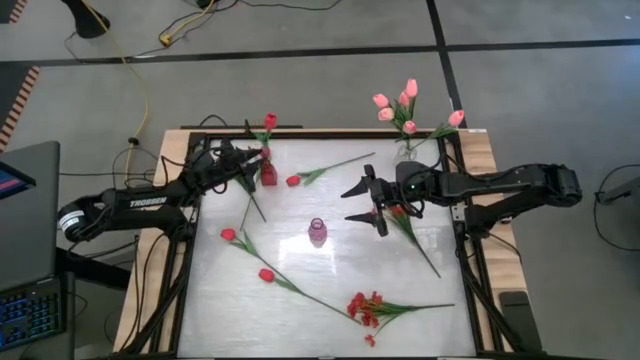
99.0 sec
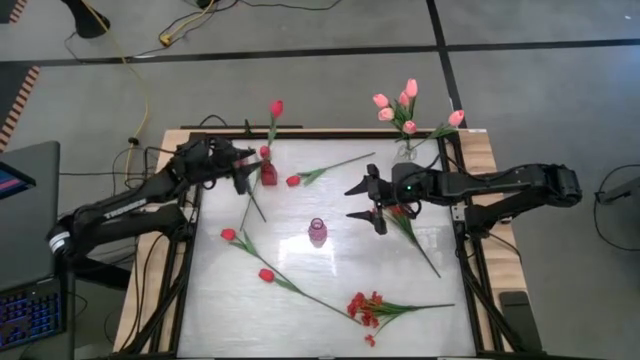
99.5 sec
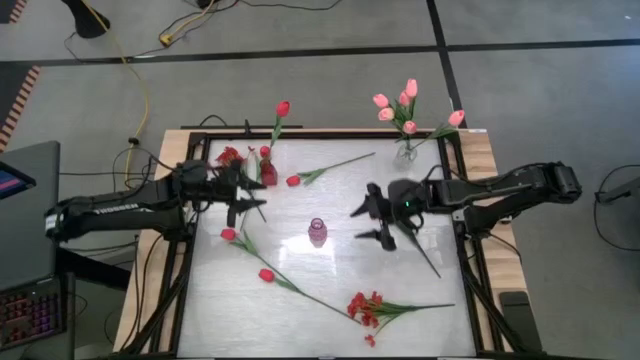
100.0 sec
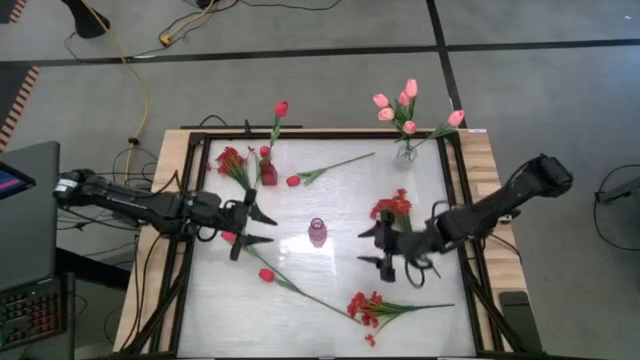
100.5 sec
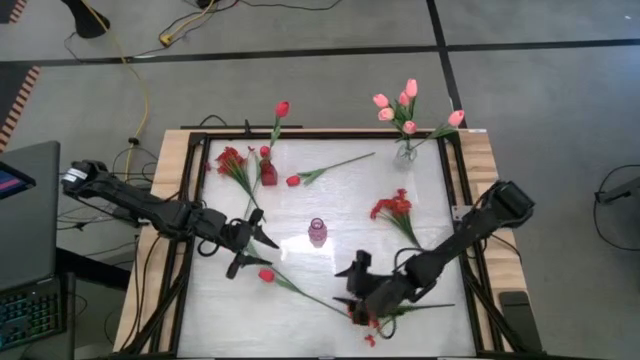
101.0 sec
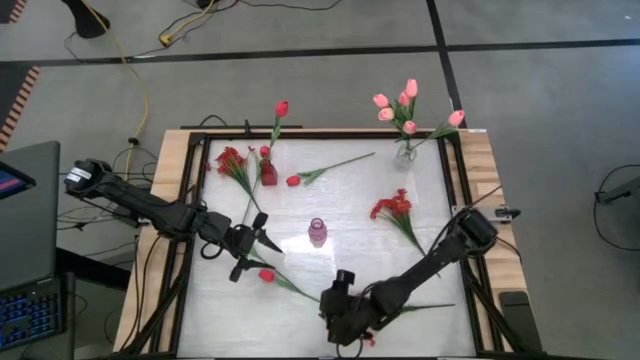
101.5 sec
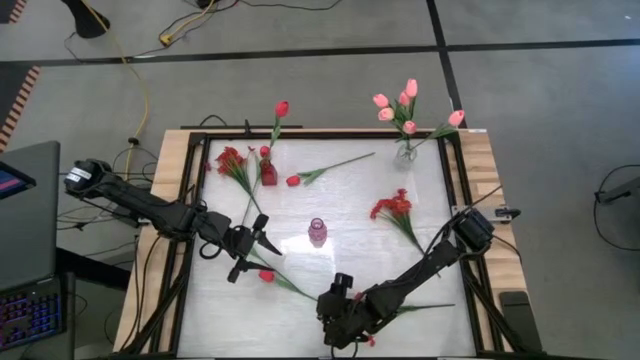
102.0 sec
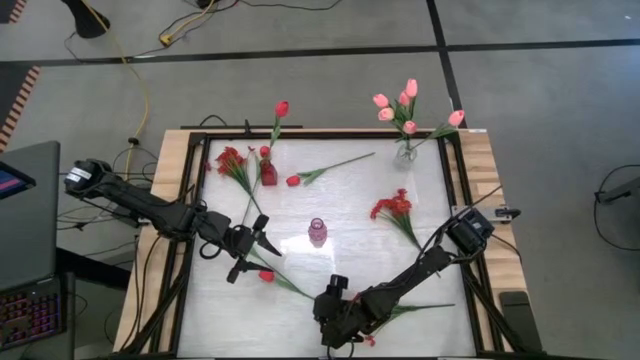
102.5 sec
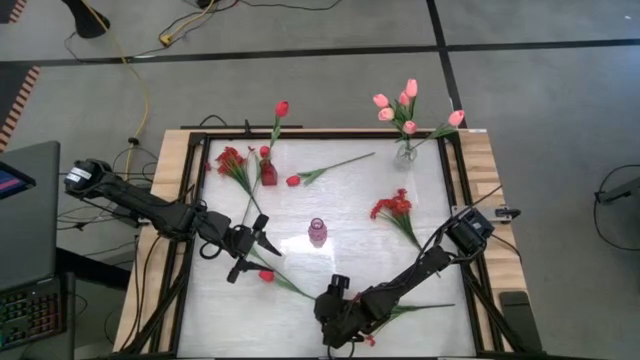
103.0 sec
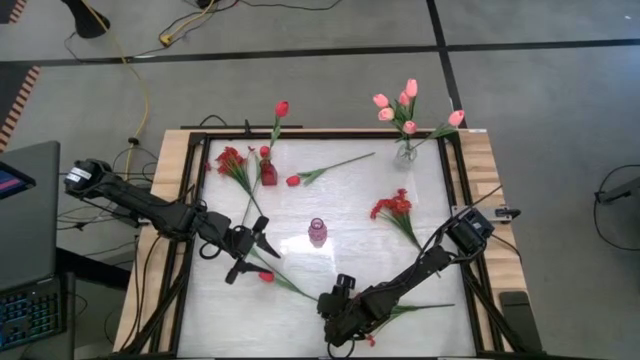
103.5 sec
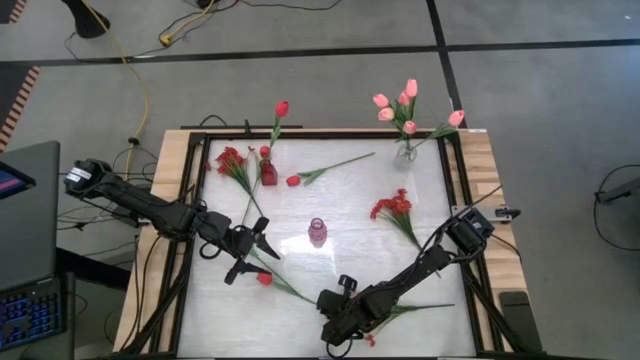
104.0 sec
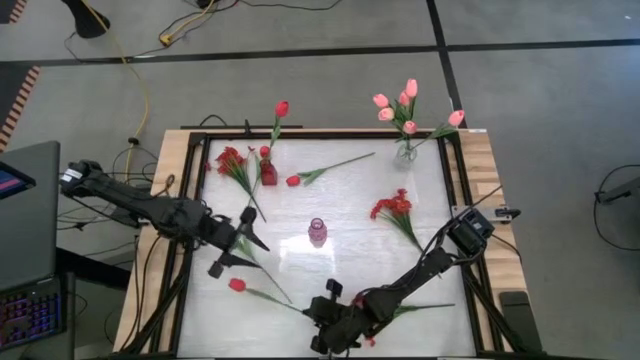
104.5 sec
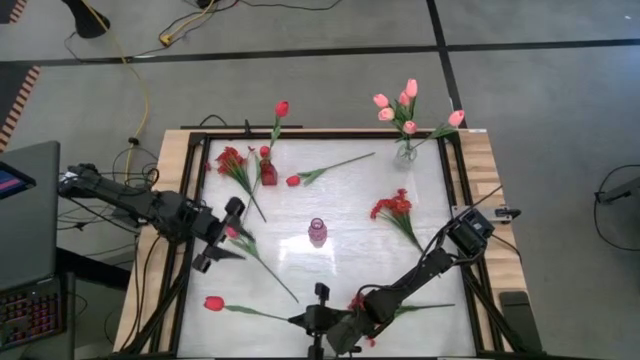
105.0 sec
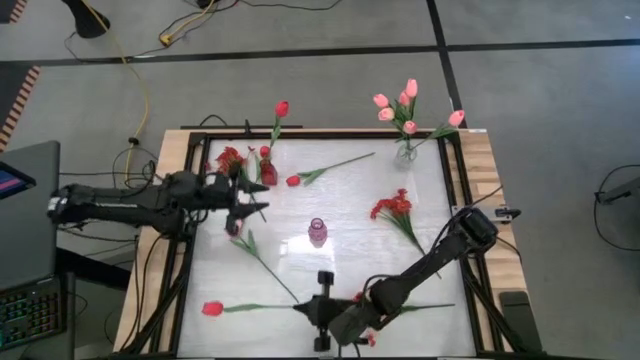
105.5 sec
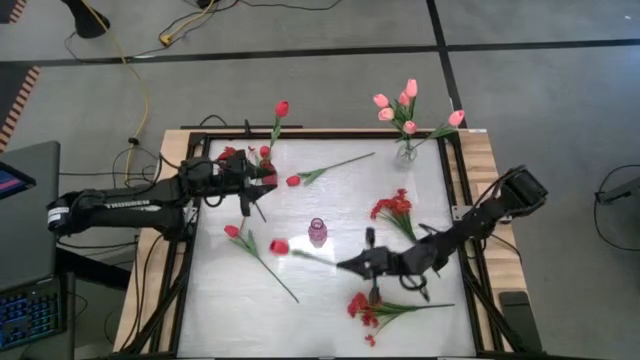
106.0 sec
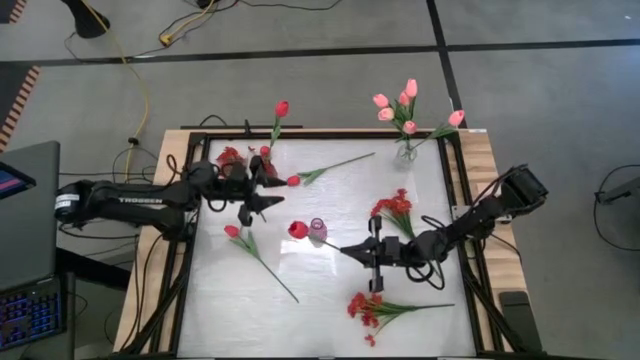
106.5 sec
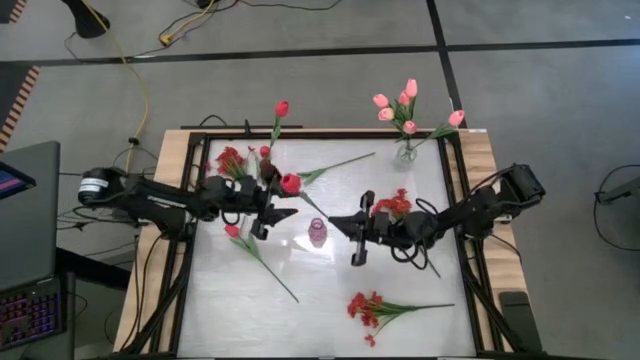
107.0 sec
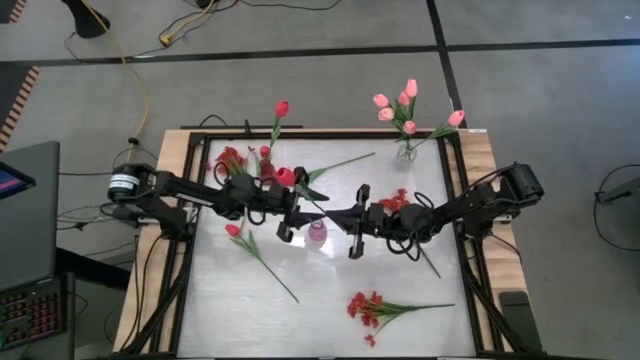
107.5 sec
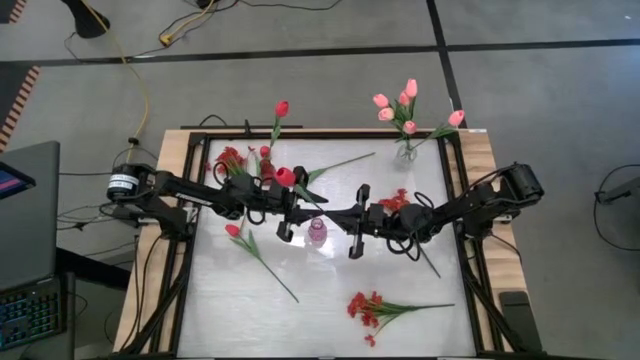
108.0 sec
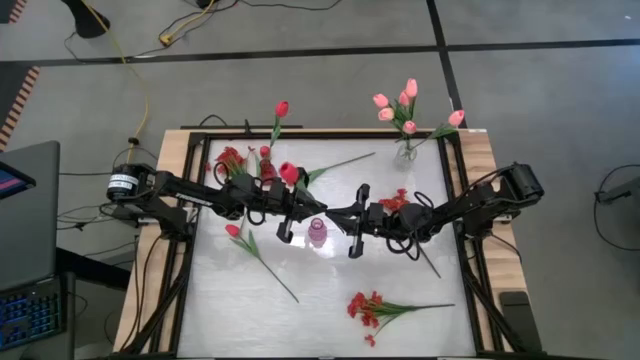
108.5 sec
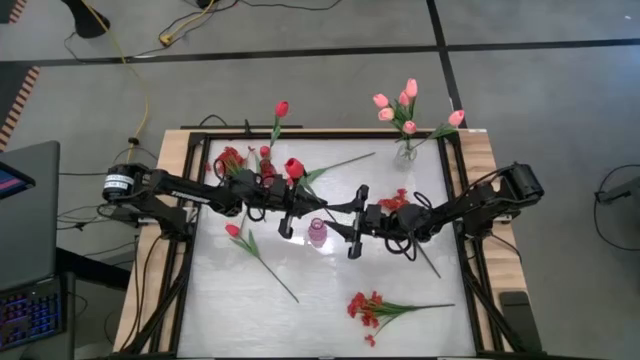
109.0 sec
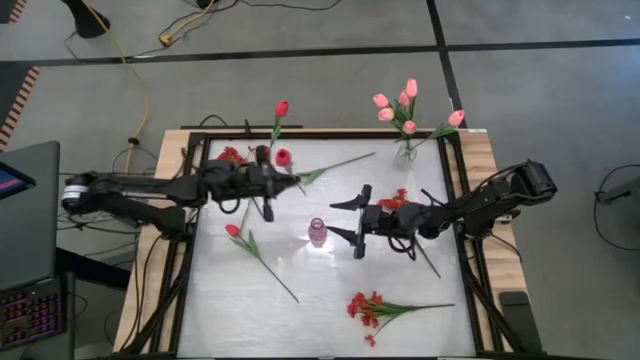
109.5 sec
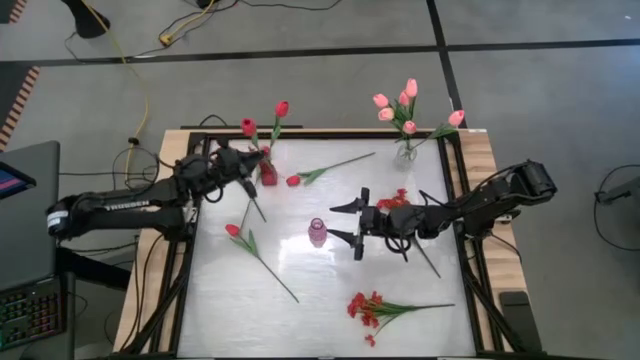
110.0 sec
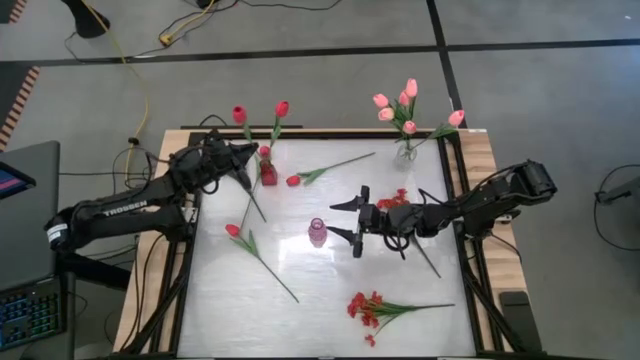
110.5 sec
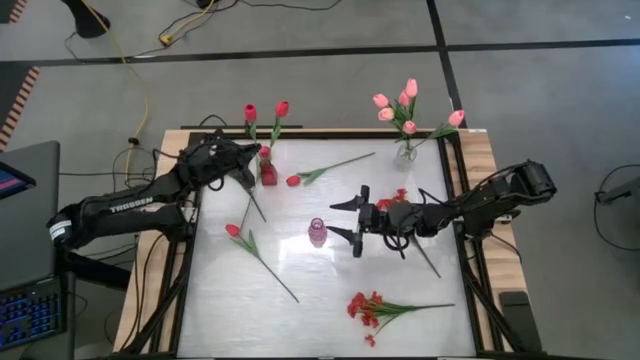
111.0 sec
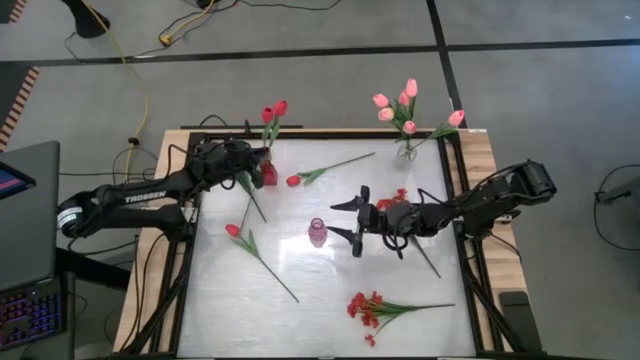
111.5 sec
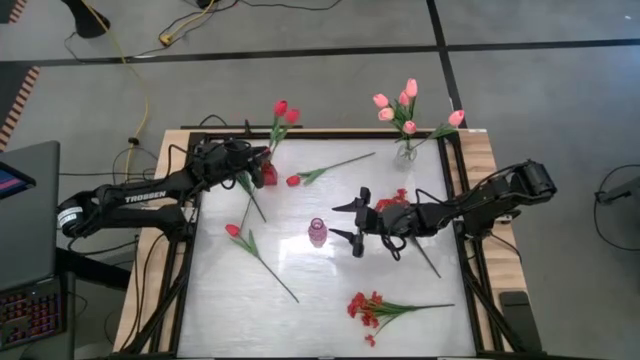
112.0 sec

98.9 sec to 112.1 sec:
Task: Sort flowers into vase by color
Put the red flower into the red vase

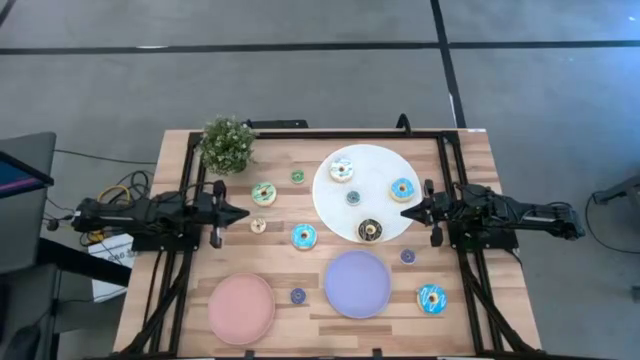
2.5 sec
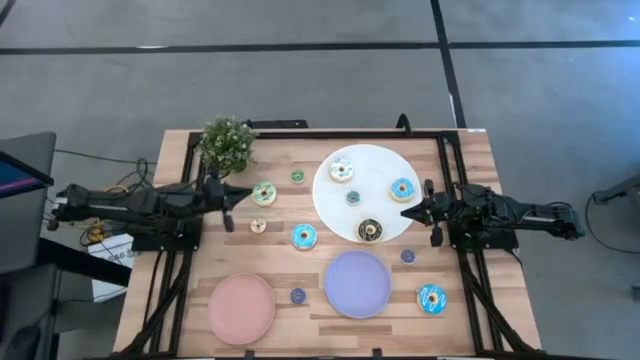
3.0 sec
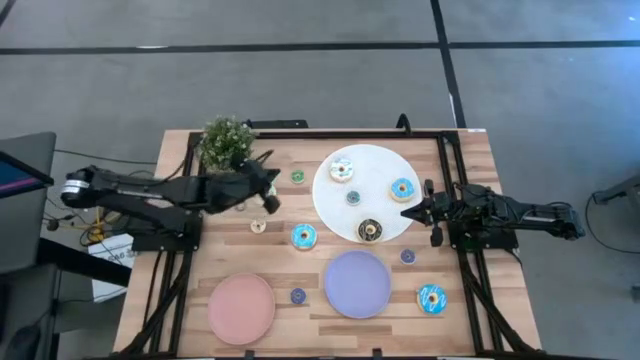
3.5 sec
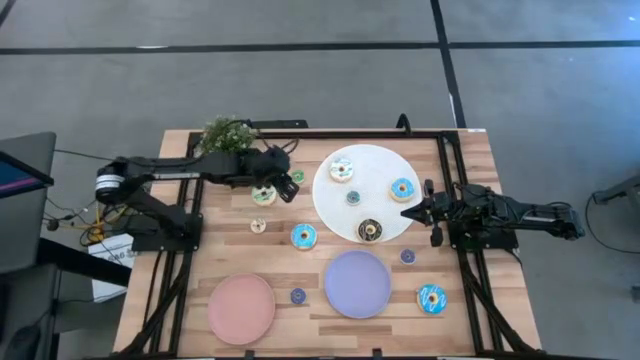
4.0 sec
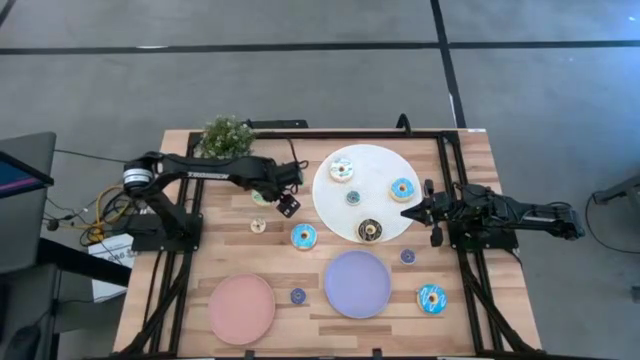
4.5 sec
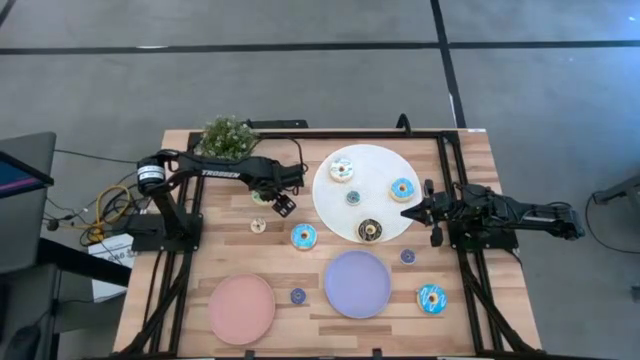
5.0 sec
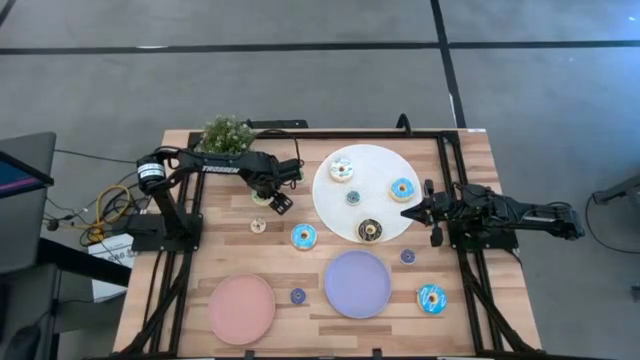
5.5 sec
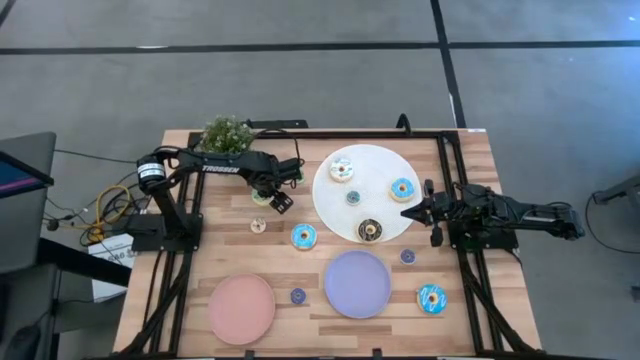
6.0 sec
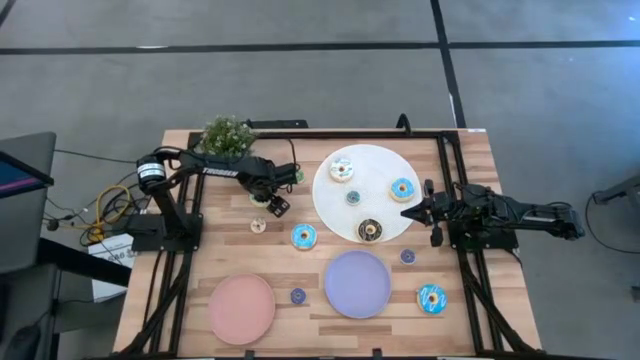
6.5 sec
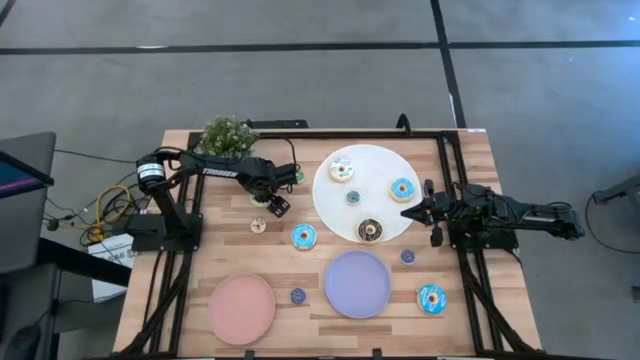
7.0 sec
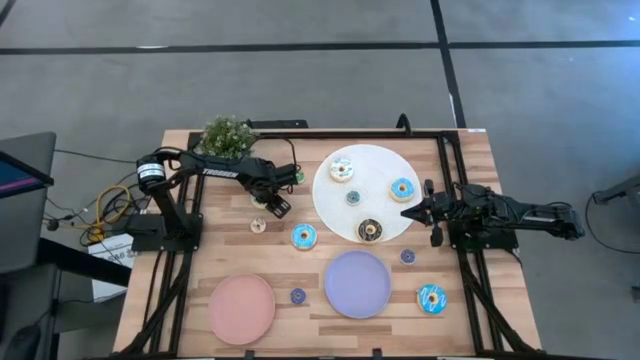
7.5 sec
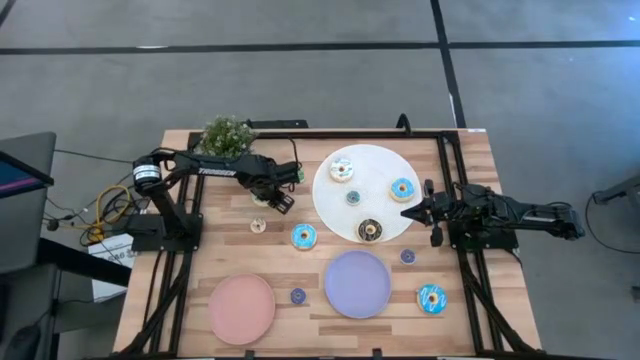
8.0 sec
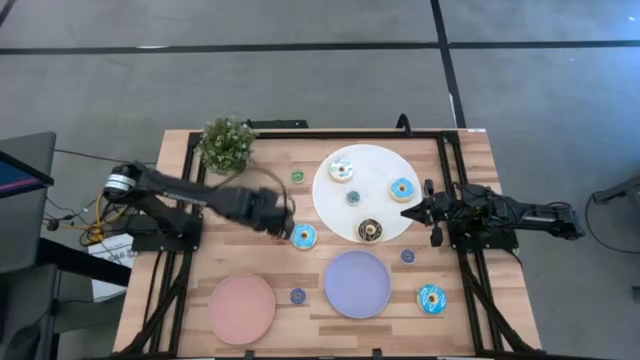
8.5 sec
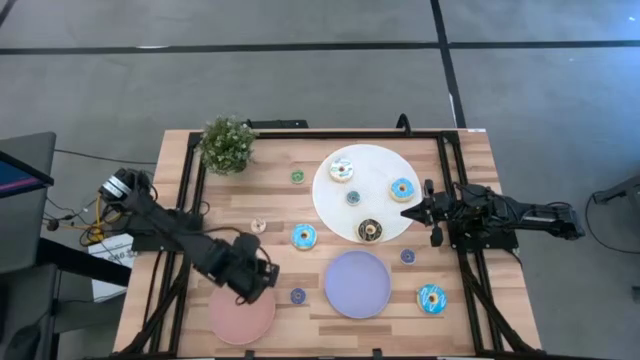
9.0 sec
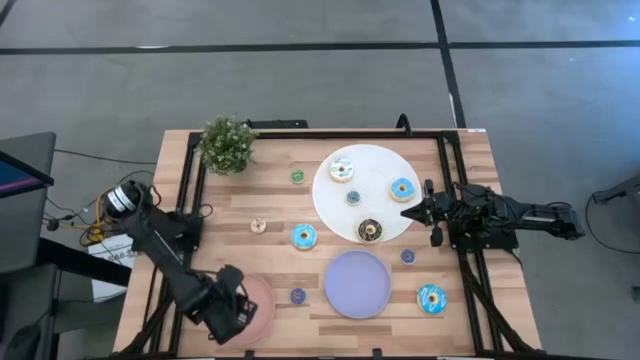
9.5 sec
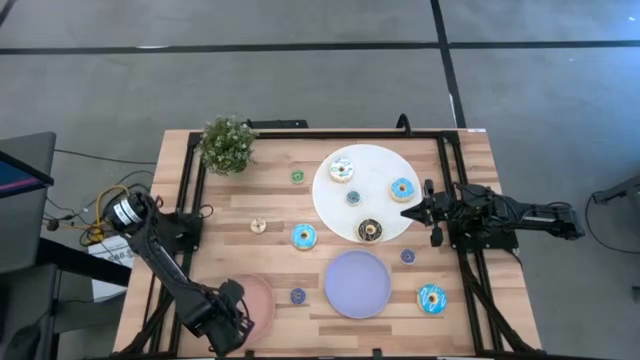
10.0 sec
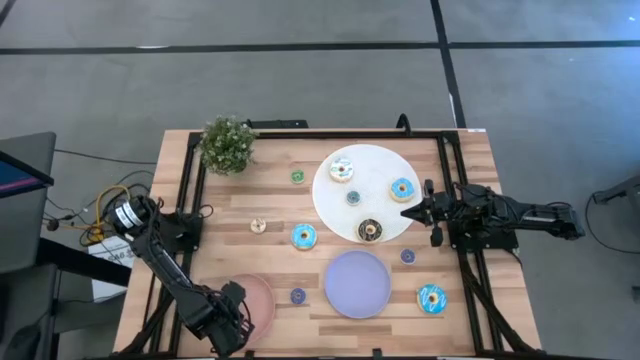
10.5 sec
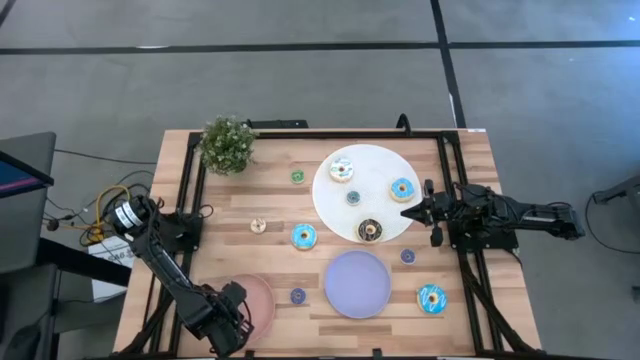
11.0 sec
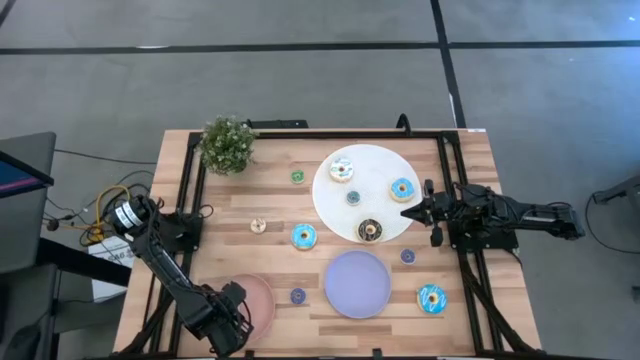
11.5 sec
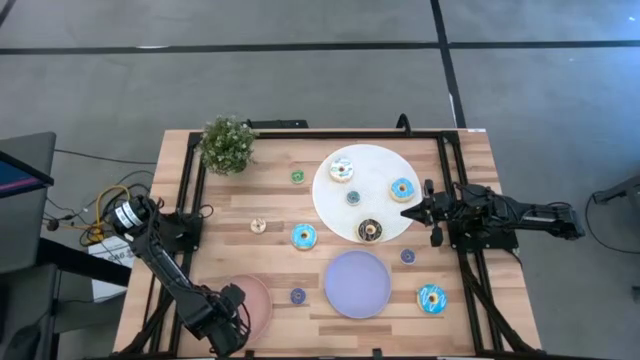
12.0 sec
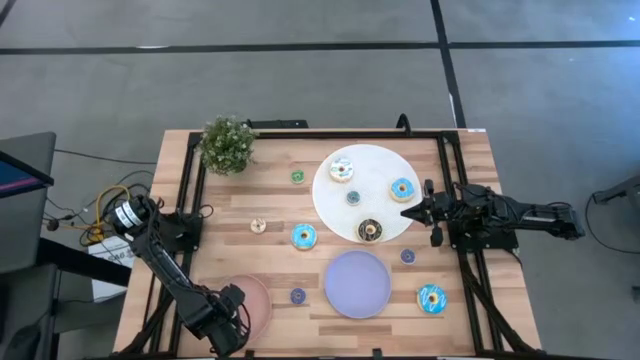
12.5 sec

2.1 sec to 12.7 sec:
Task: Pick & Place donuts
Put the big light green donut on the pink plate
